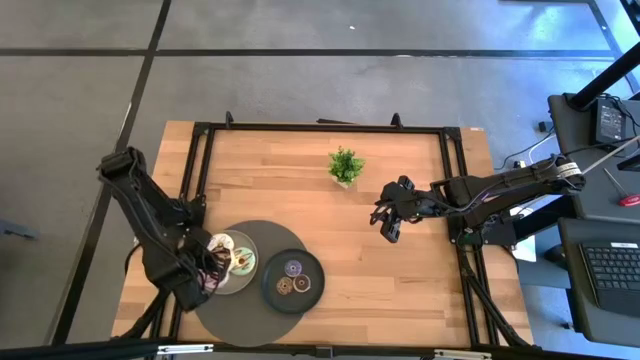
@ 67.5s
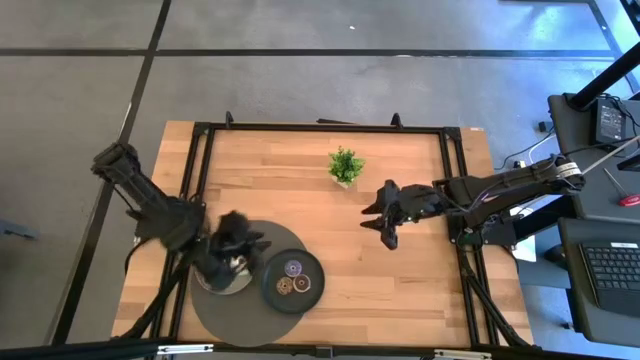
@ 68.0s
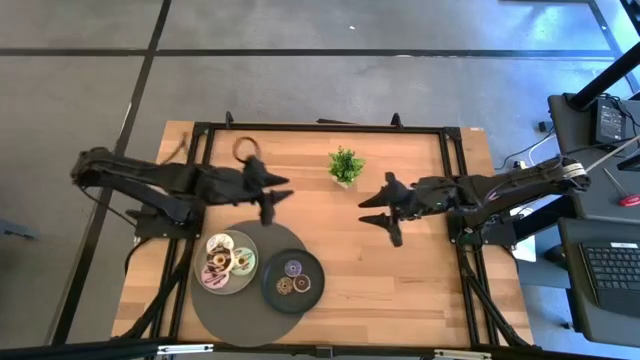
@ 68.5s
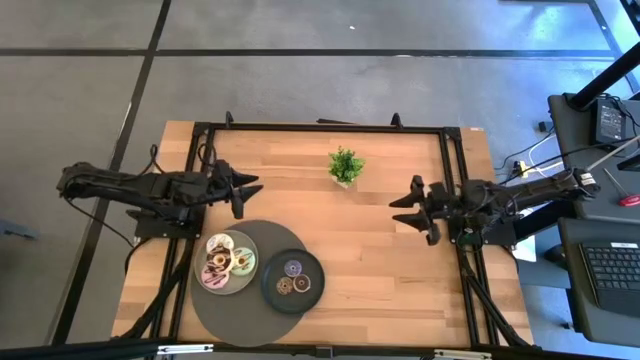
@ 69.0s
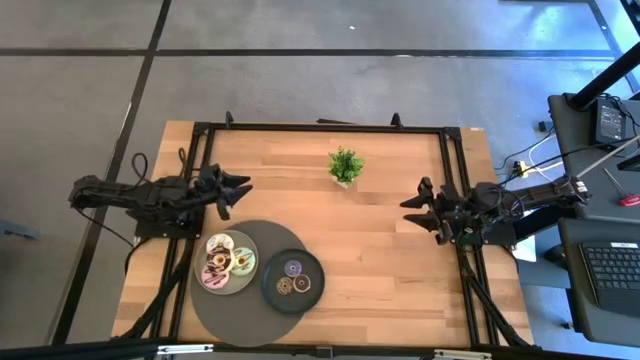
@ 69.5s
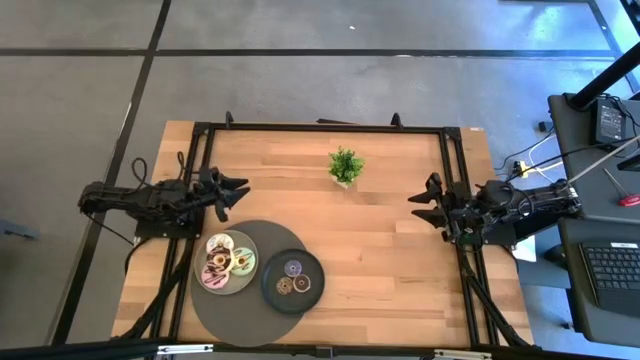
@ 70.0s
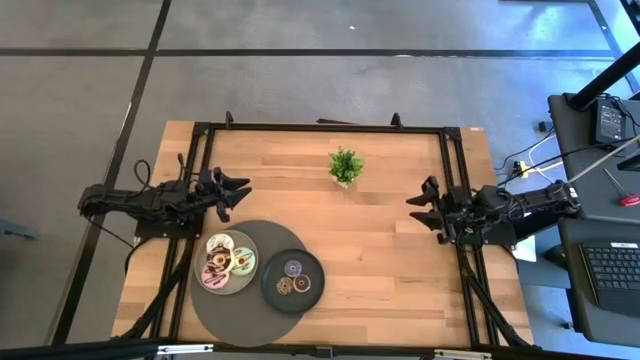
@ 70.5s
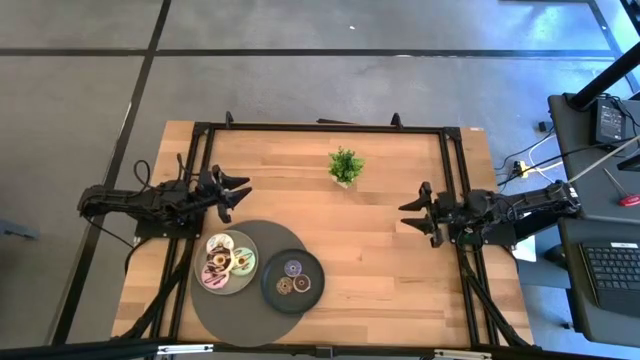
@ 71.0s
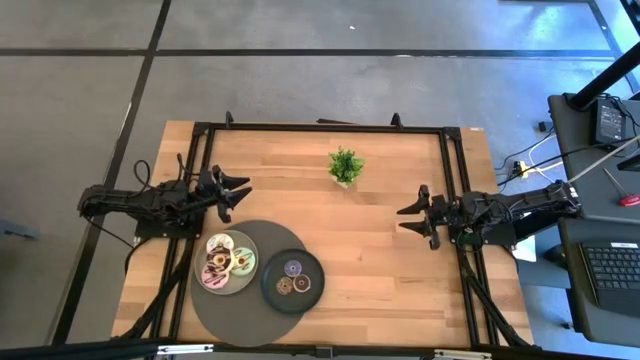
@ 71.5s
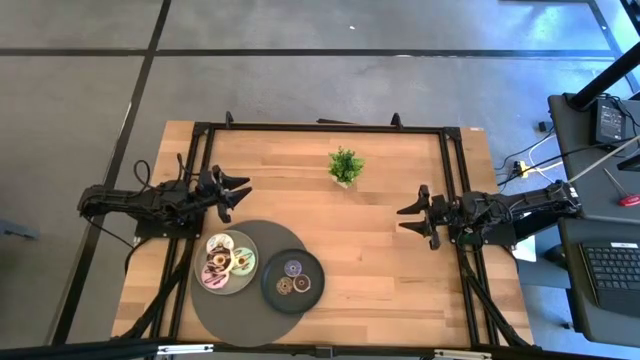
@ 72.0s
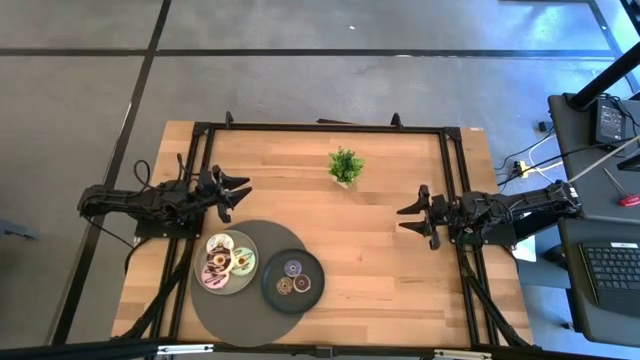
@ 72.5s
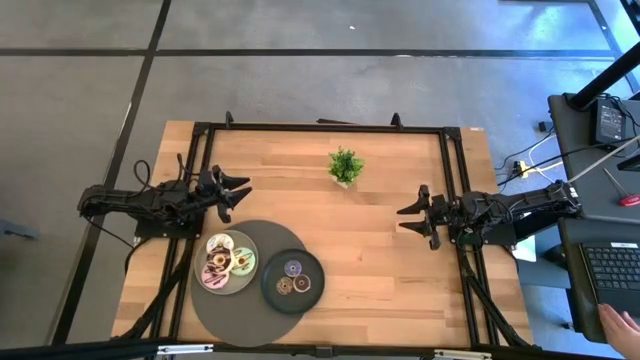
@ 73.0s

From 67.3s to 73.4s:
Task: Pick & Place donuts
Return to Home Position

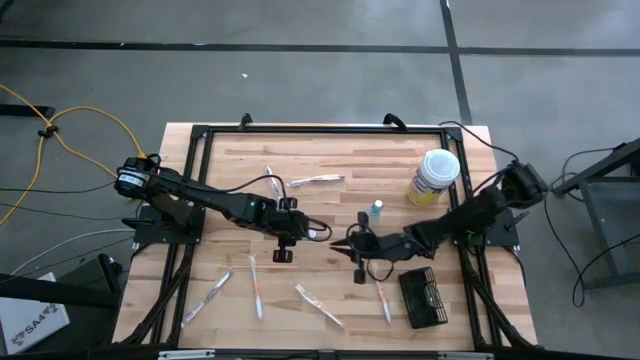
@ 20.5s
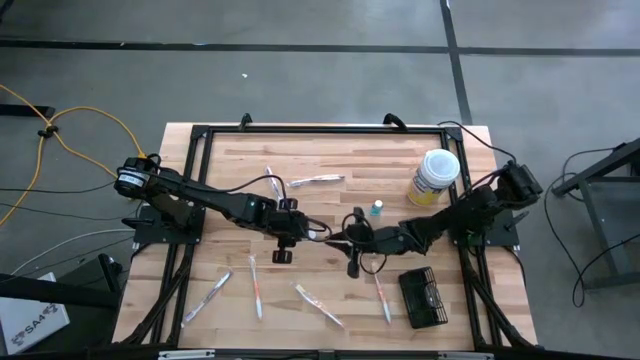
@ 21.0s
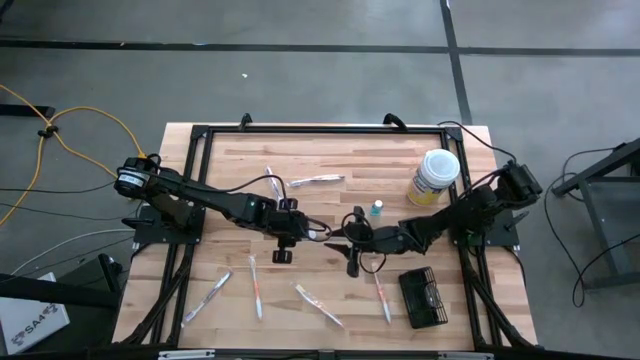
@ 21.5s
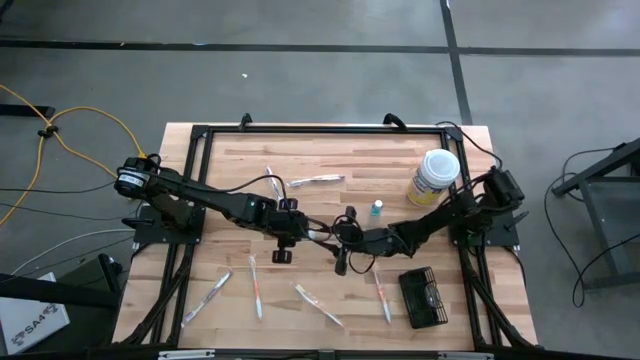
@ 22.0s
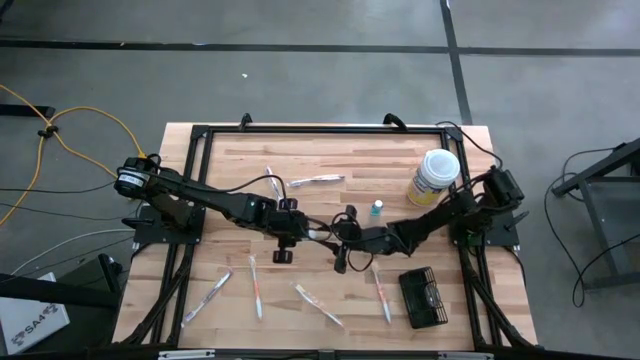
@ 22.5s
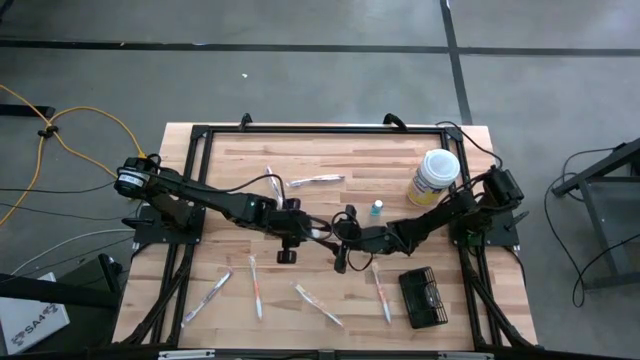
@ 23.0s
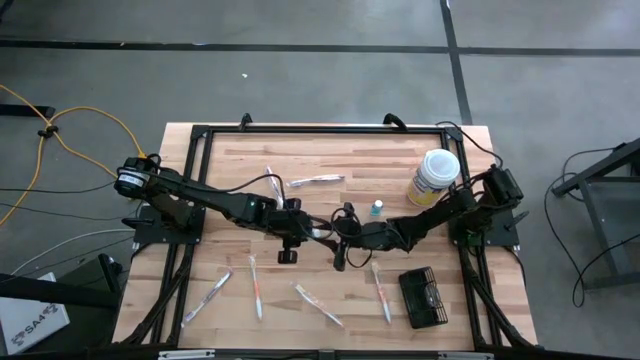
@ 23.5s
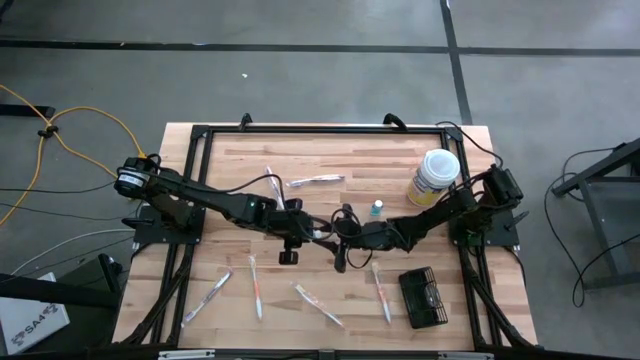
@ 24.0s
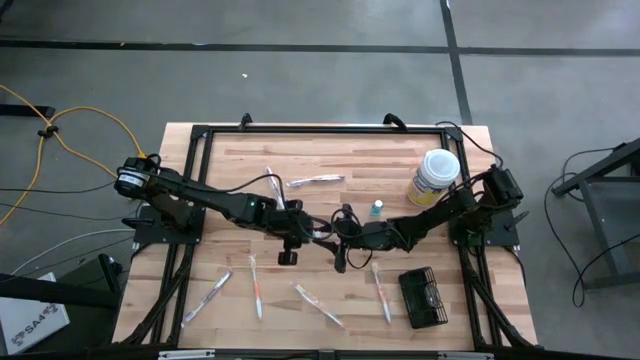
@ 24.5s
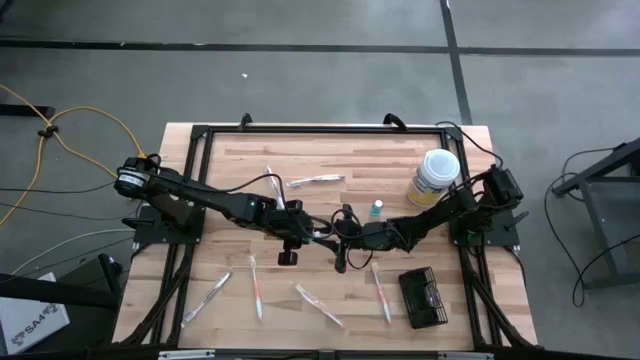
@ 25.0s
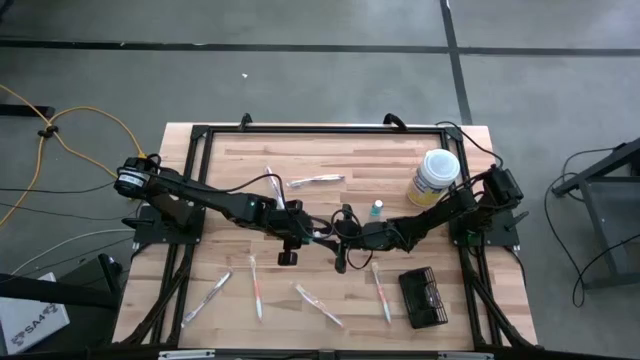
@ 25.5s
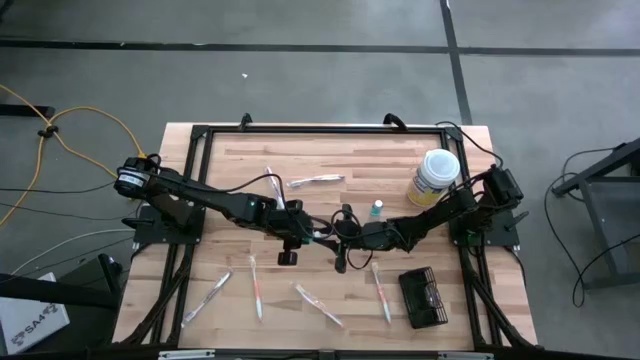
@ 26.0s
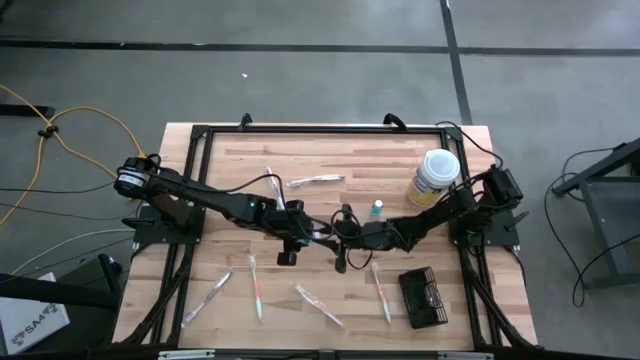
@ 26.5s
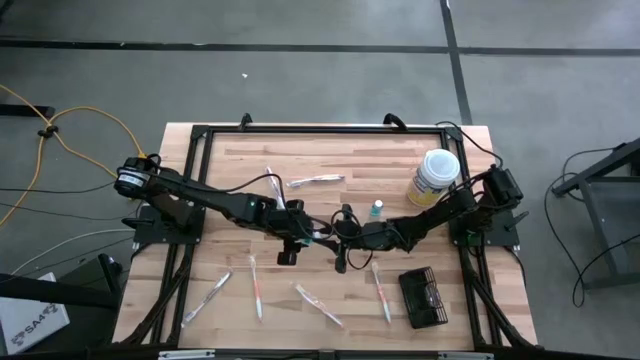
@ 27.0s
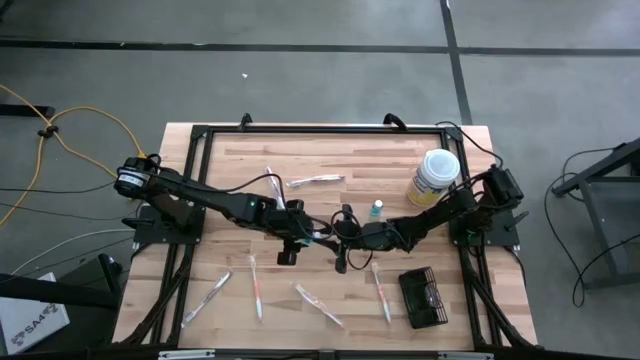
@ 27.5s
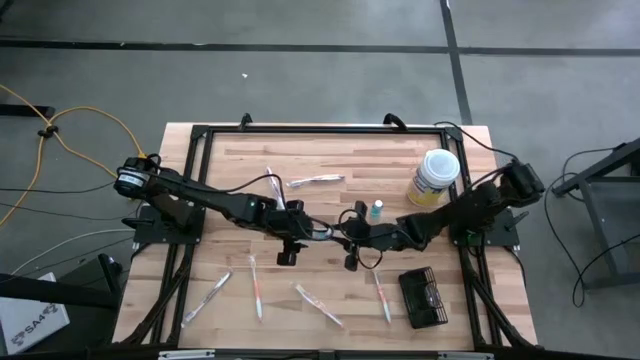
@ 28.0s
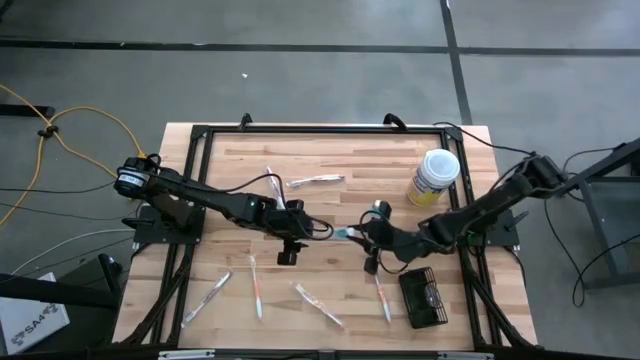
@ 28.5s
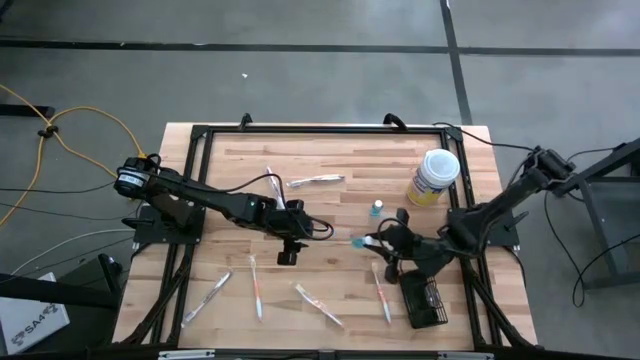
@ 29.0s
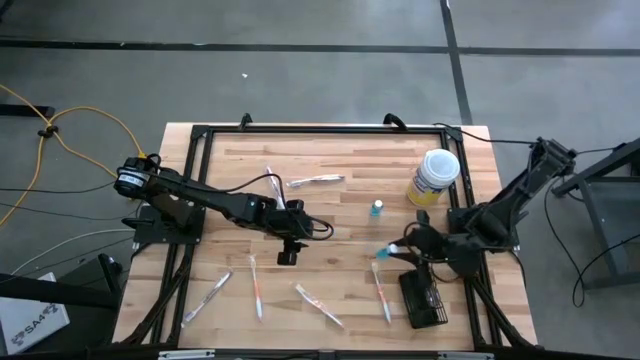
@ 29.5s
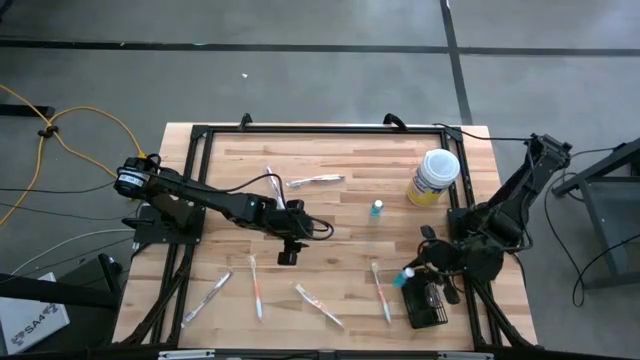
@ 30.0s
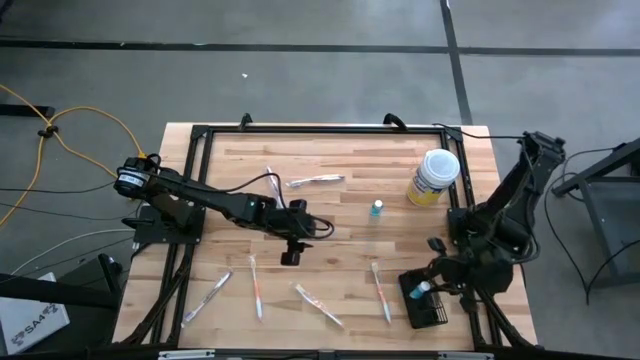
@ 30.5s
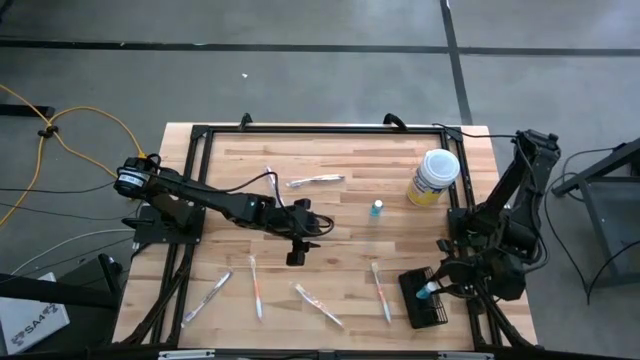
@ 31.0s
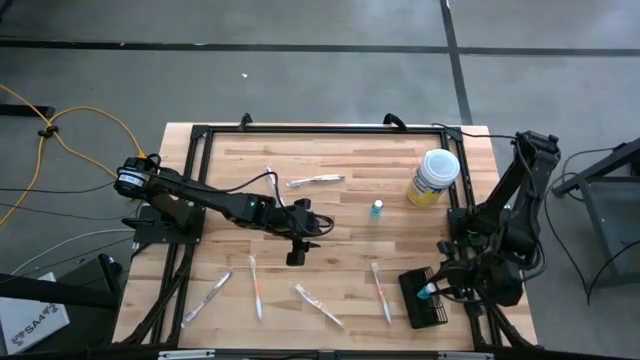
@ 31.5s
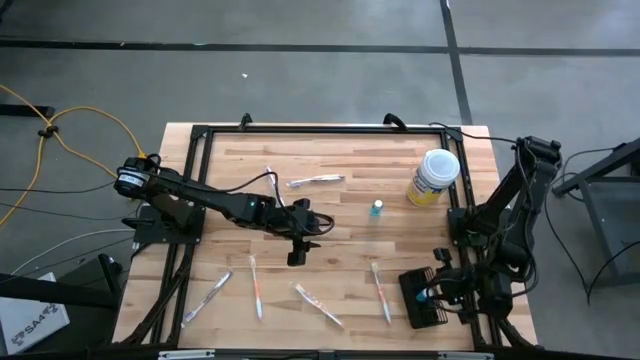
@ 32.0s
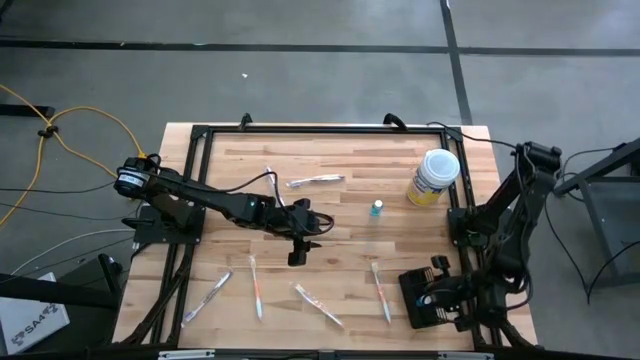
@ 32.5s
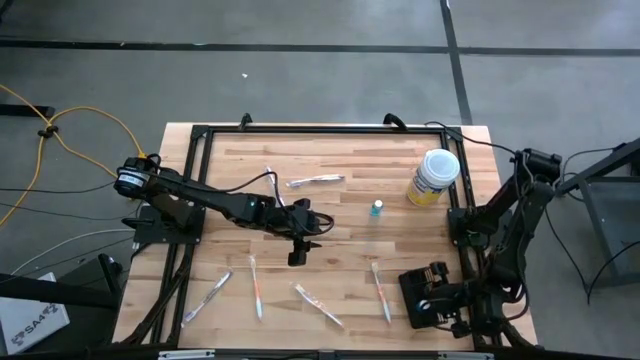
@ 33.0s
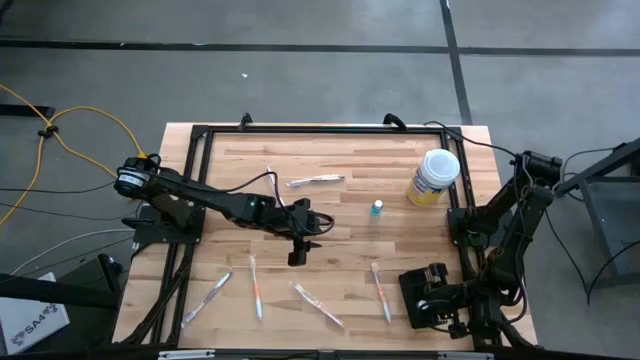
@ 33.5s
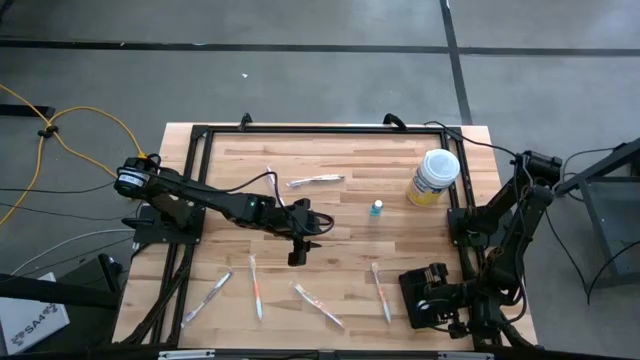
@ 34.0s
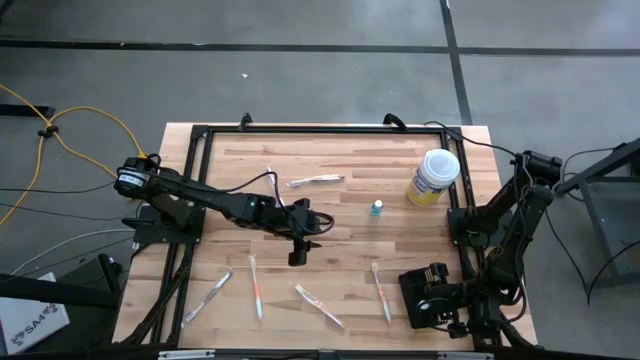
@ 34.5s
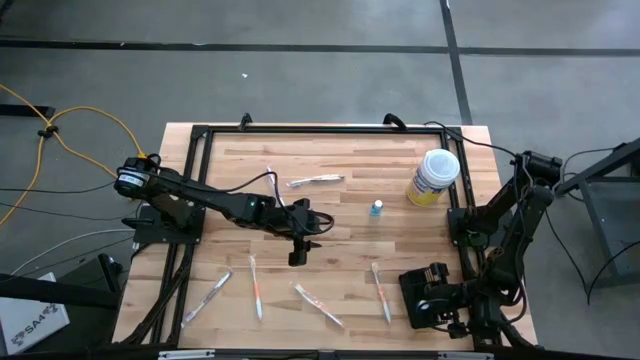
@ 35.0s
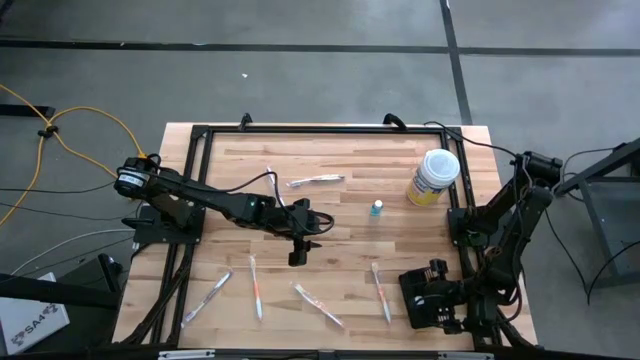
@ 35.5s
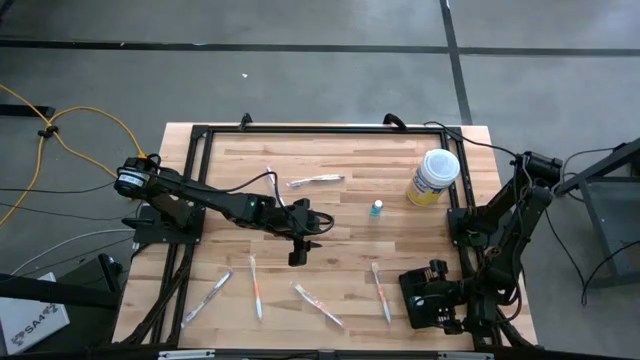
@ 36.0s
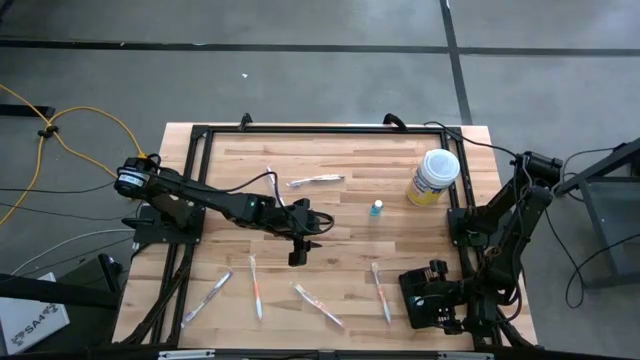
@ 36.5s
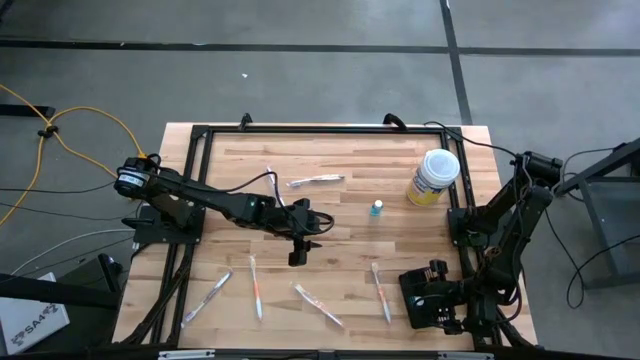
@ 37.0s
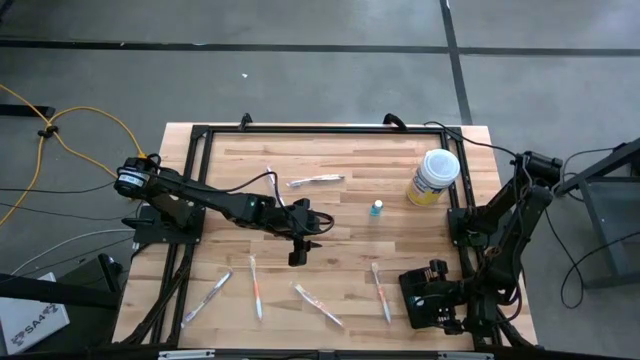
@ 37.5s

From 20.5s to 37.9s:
Task: Pick & Place toothbrushing station
Put the blue mouthwash into the mesh organizer
